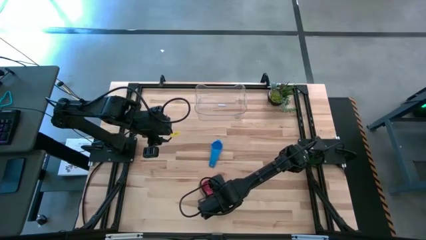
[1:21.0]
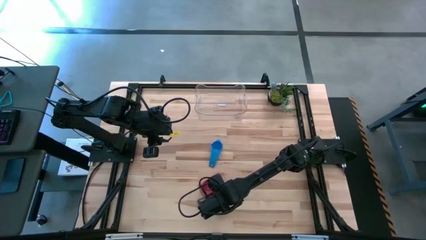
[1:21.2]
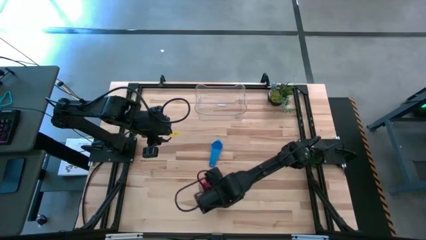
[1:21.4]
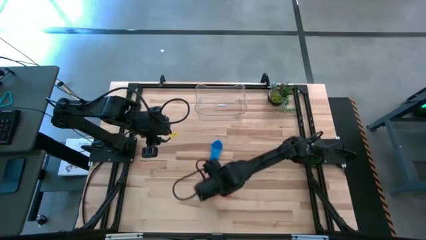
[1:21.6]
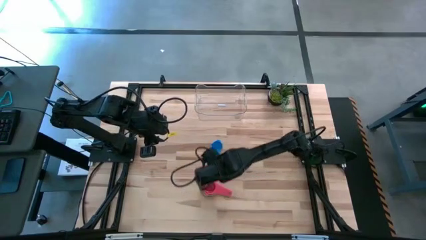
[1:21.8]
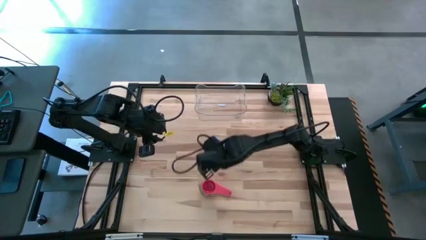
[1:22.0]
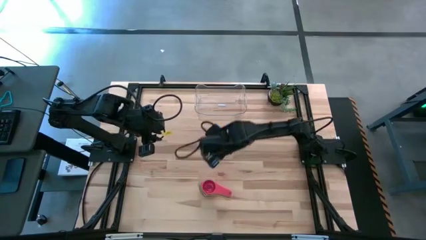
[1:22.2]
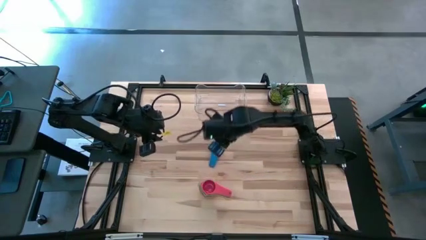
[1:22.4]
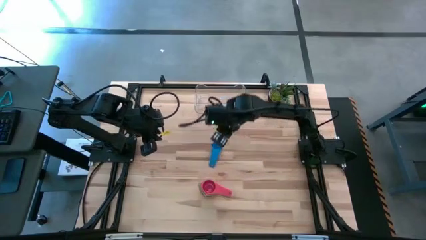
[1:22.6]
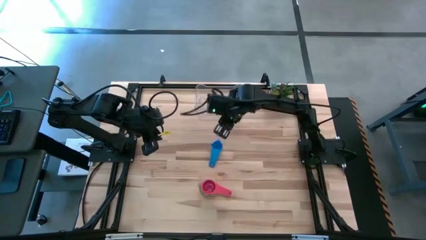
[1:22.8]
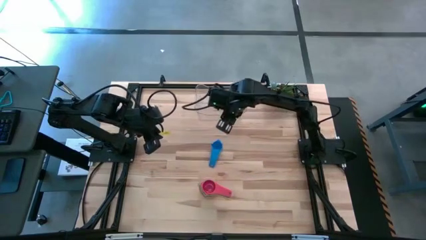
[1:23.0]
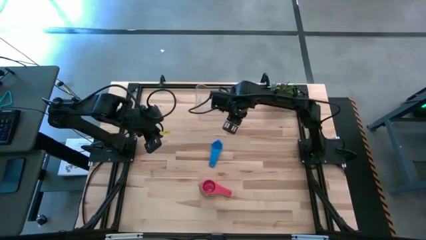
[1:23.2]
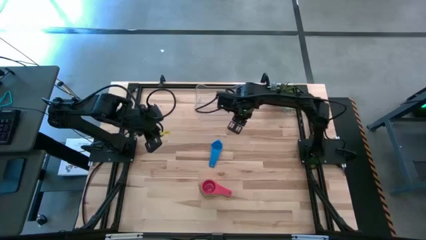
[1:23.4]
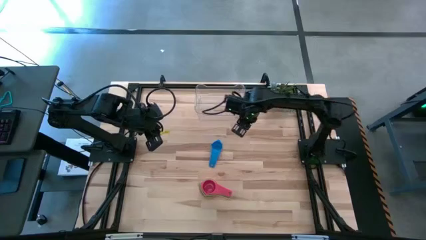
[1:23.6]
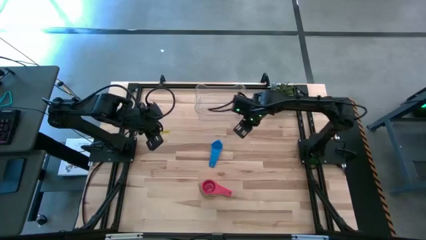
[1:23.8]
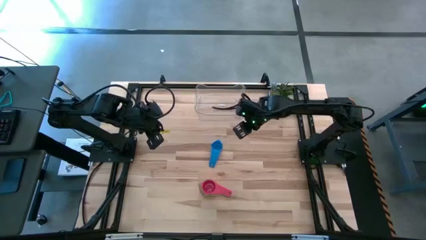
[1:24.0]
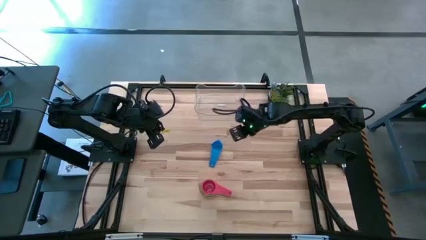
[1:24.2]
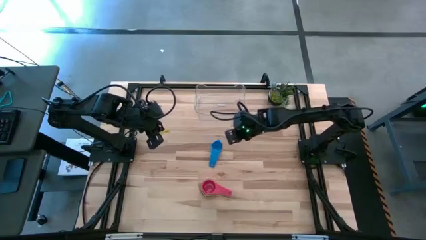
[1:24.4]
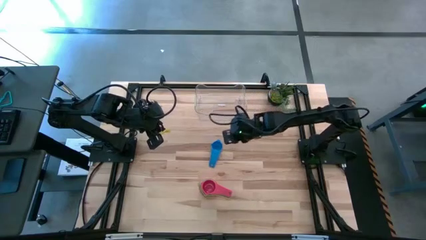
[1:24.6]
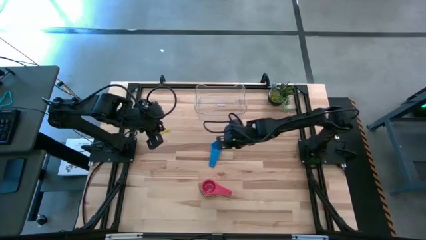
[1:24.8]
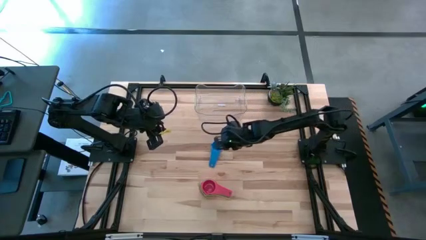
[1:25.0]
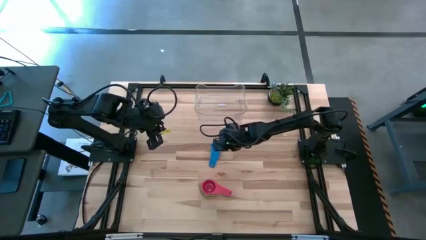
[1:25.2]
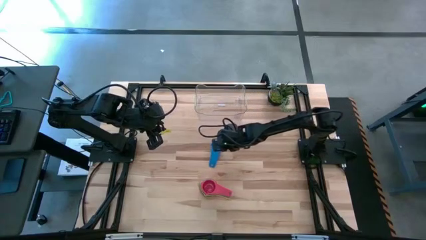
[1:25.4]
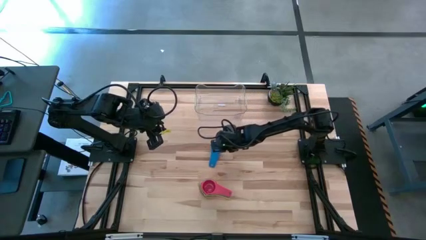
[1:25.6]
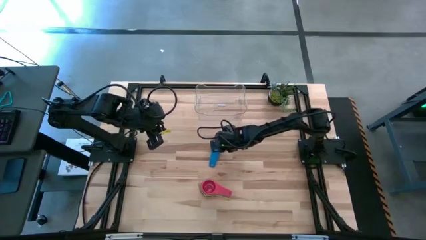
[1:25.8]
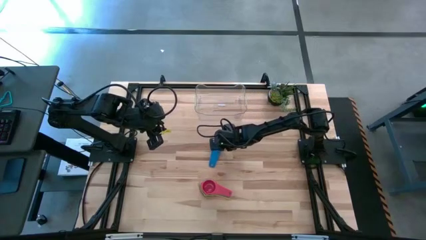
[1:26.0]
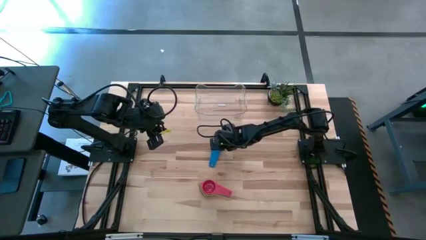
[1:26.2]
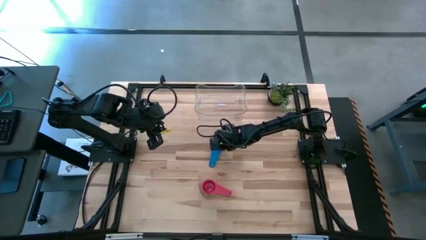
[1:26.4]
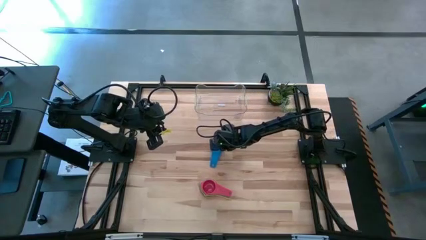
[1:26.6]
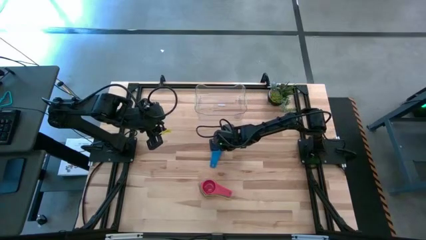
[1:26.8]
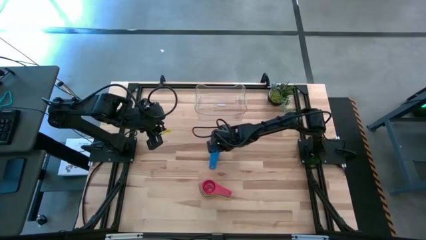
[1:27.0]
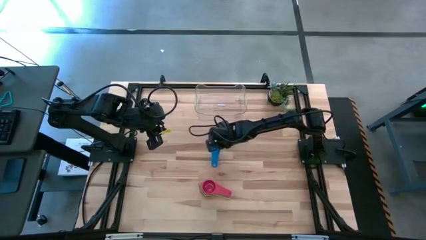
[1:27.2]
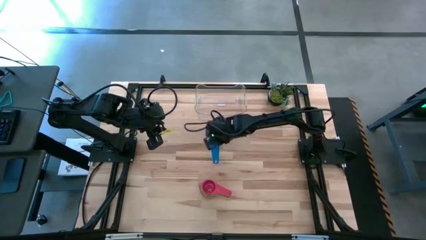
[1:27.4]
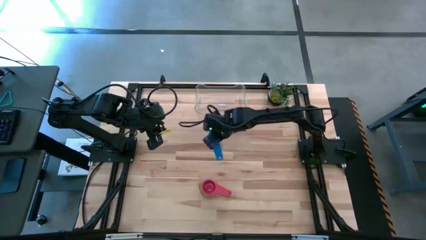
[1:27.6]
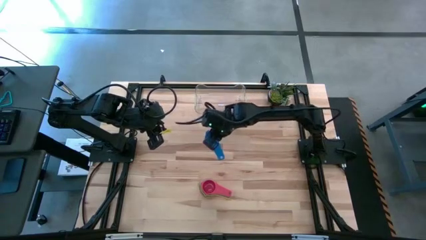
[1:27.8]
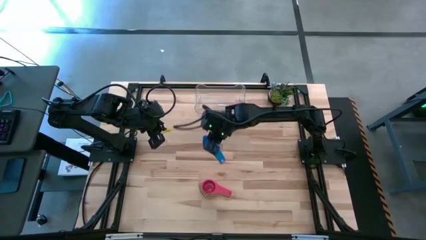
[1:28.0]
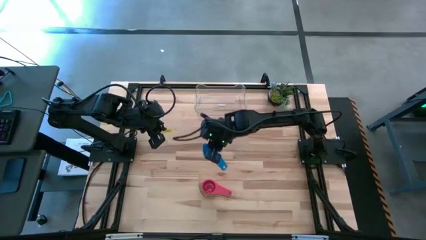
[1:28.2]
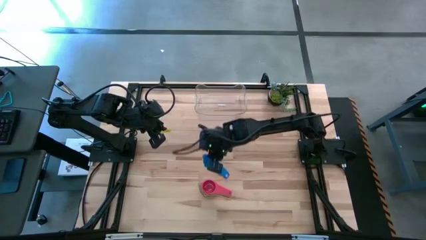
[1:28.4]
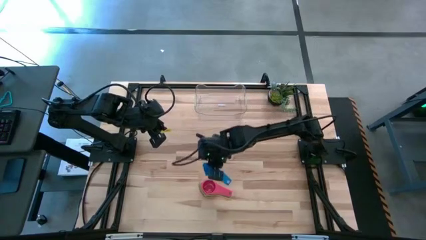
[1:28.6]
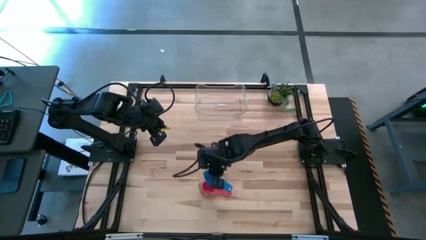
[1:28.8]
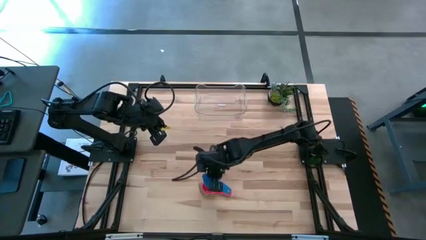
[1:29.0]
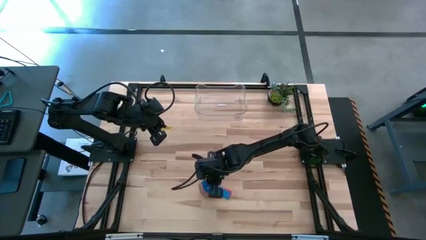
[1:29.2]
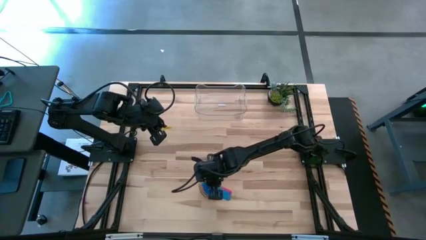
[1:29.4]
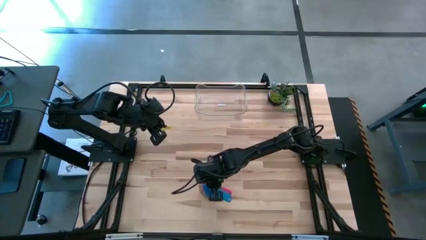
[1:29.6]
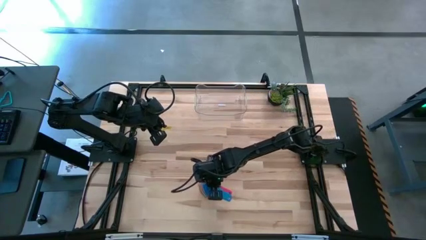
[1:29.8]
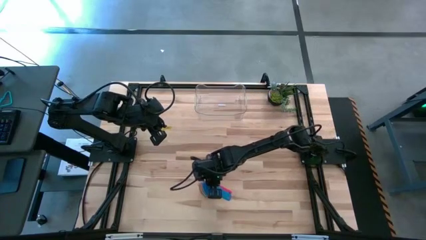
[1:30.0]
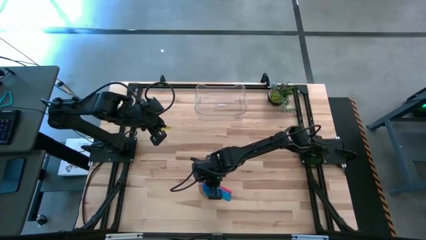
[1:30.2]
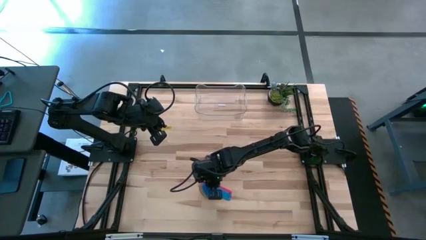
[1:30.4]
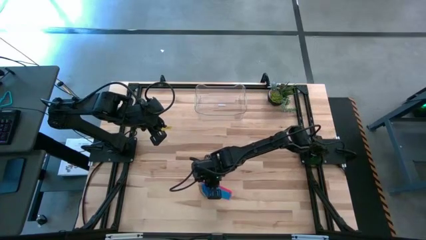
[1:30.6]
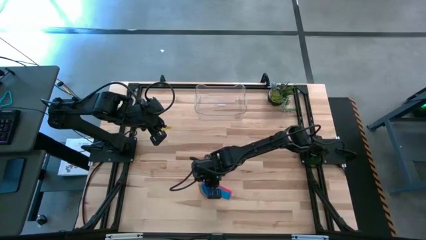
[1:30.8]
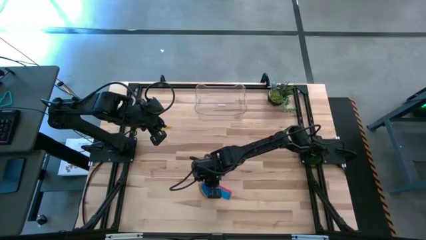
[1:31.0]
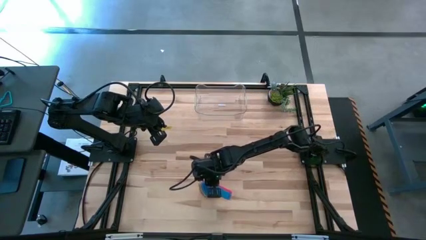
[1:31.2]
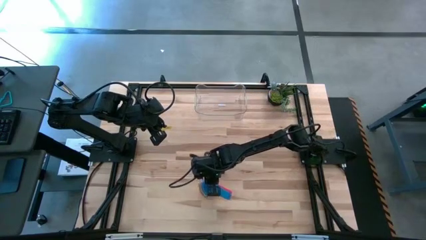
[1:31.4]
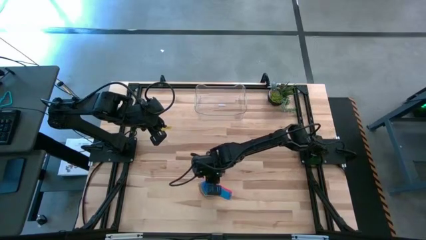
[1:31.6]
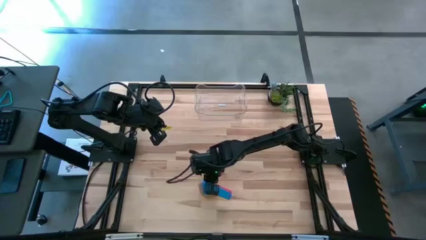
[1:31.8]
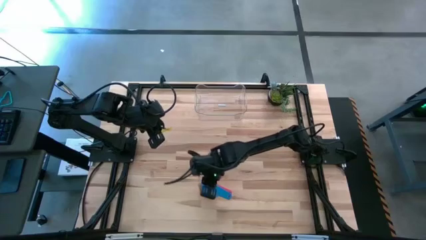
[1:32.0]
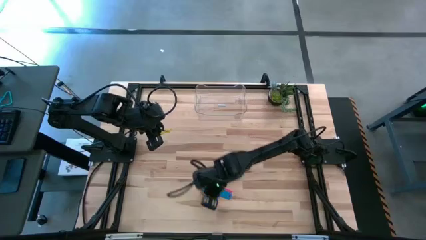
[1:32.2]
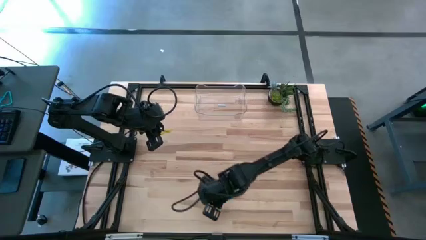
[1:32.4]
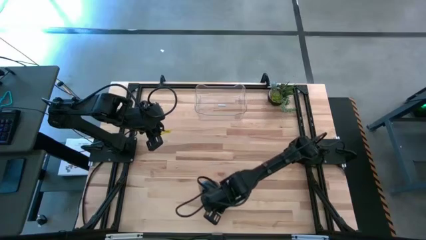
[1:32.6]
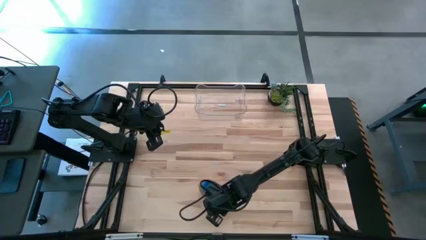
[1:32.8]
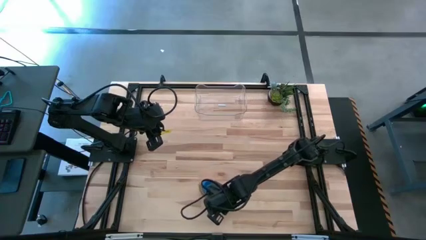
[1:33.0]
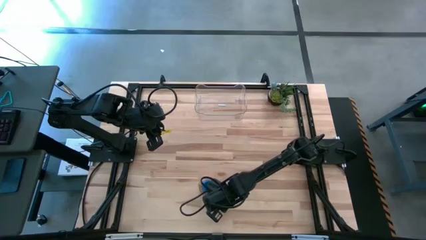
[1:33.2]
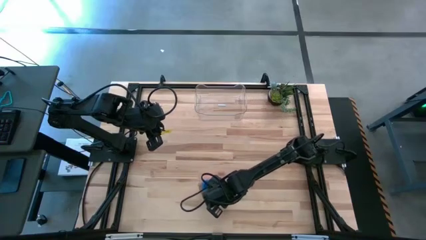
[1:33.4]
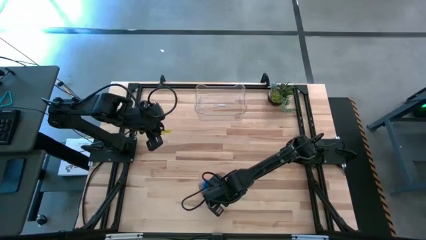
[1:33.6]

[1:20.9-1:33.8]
Task: Nest measuring cups in basket
Stack the blue measuring cup in the pink measuring cup

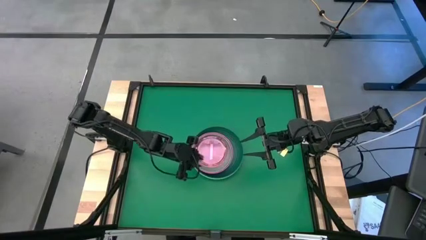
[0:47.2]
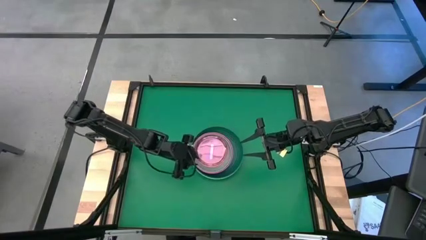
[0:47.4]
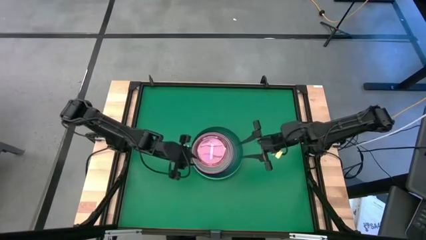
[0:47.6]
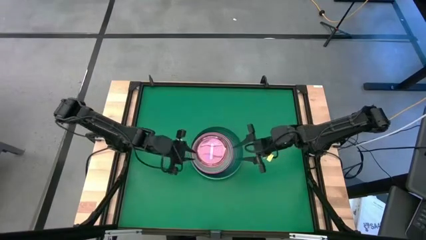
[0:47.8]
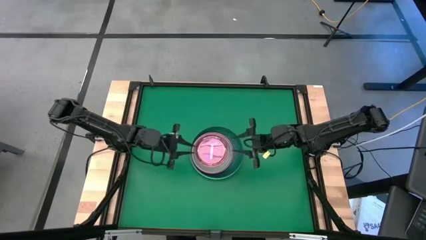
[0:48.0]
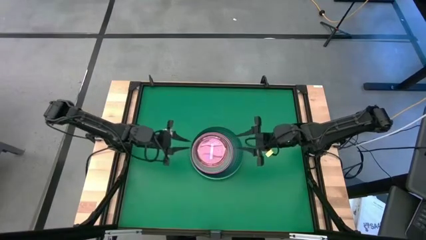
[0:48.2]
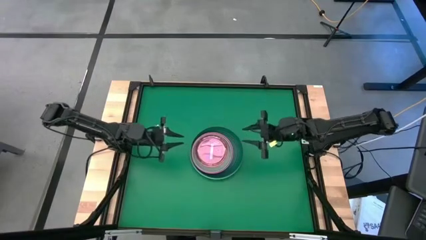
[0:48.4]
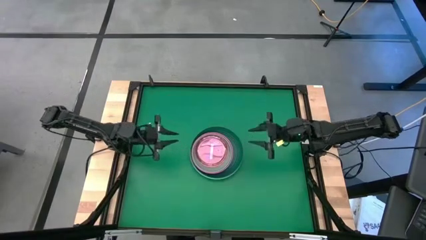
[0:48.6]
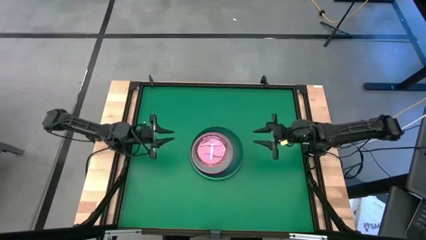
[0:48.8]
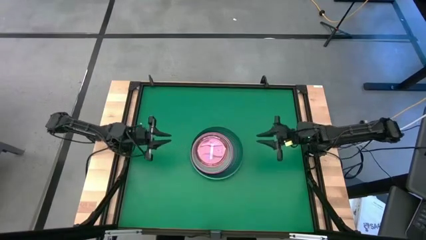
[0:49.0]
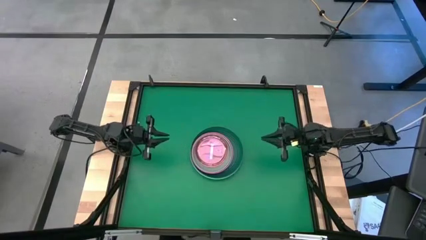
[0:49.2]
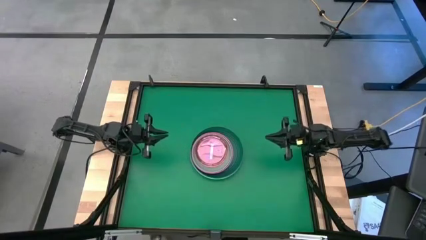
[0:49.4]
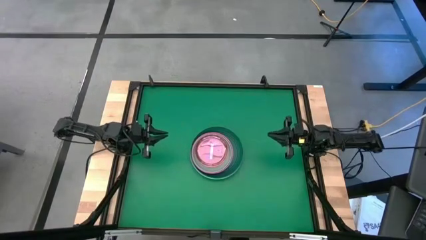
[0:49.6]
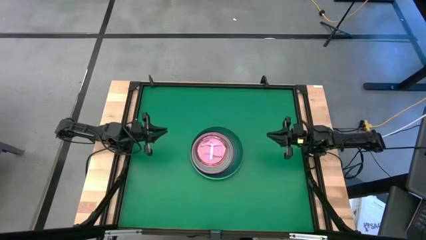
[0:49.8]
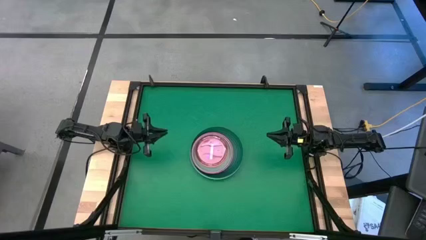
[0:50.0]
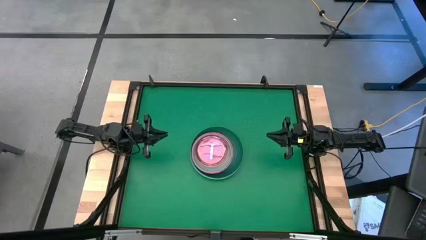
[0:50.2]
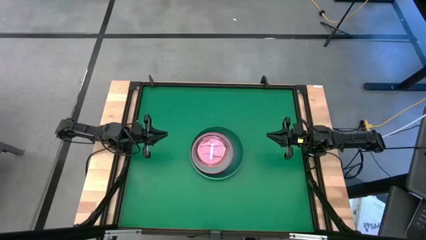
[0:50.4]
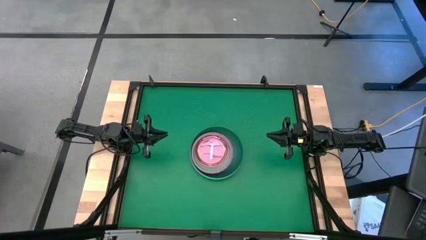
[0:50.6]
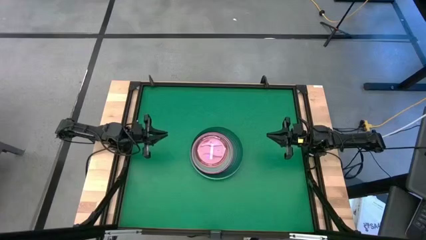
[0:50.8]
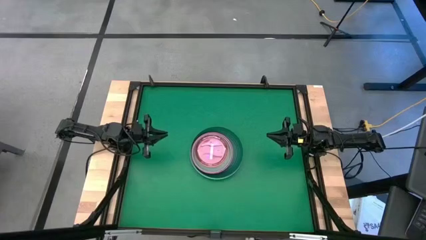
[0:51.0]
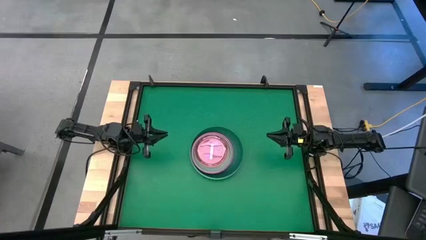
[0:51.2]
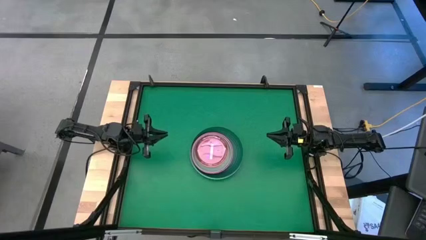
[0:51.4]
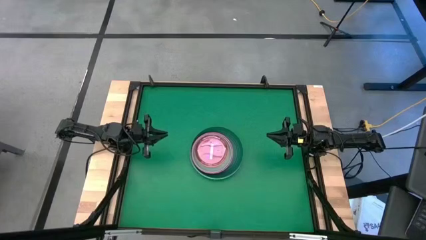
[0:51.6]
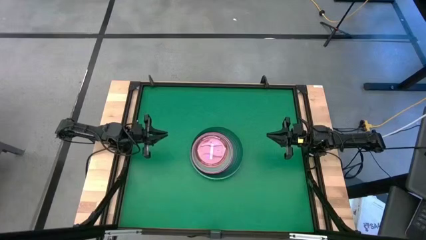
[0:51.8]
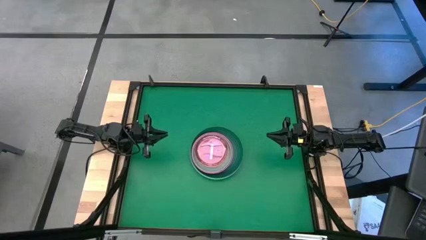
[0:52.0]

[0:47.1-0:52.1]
Task: Stack plastic plates
Return to Home Position
